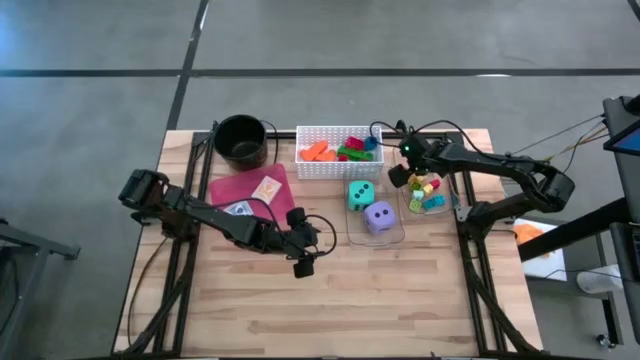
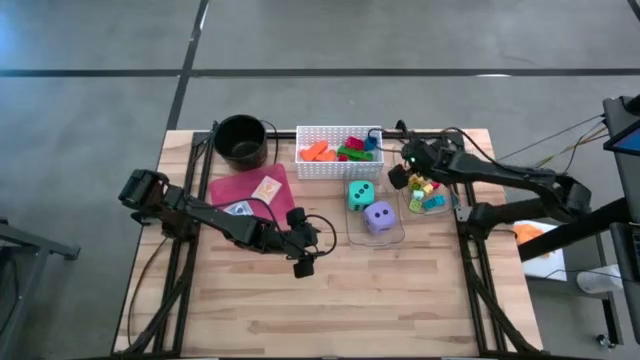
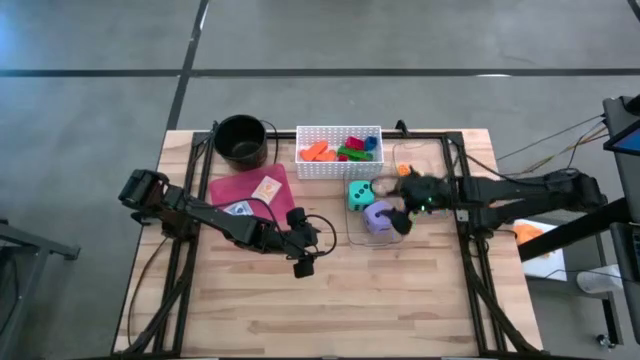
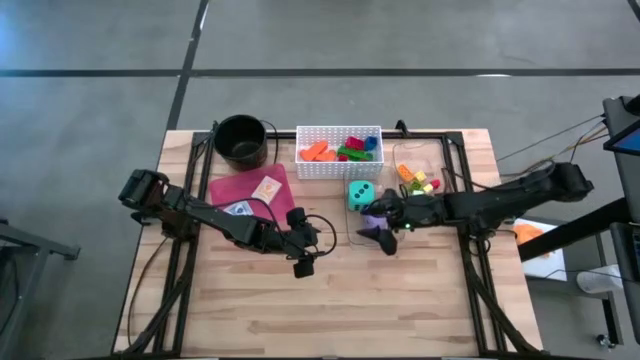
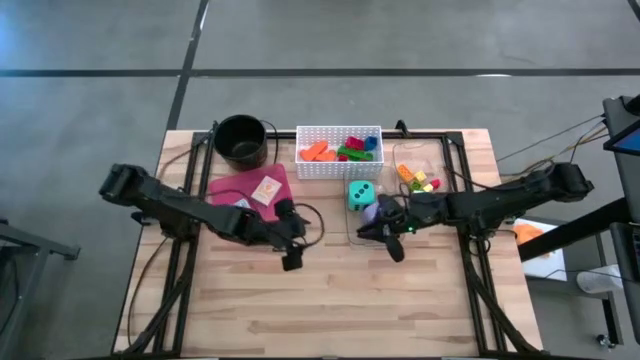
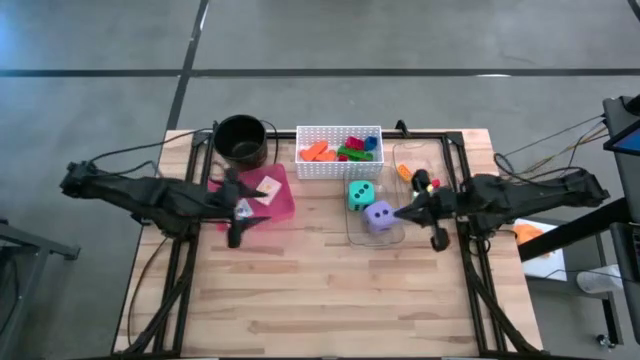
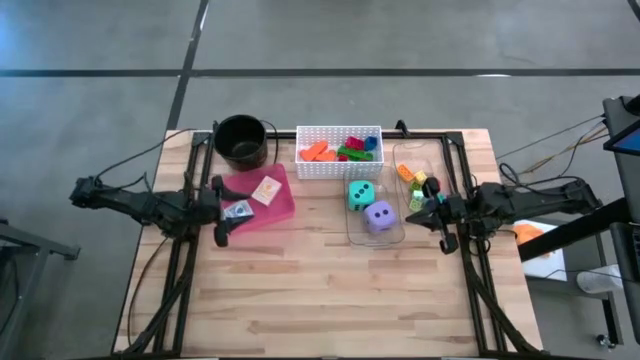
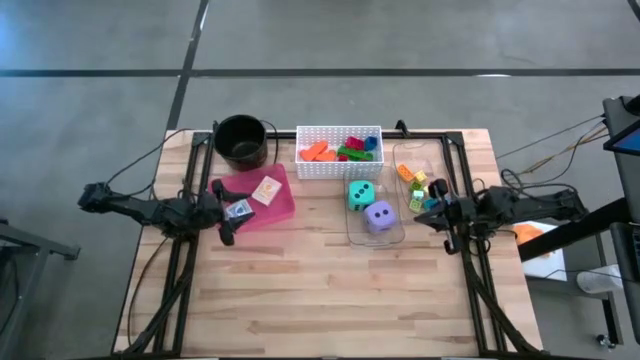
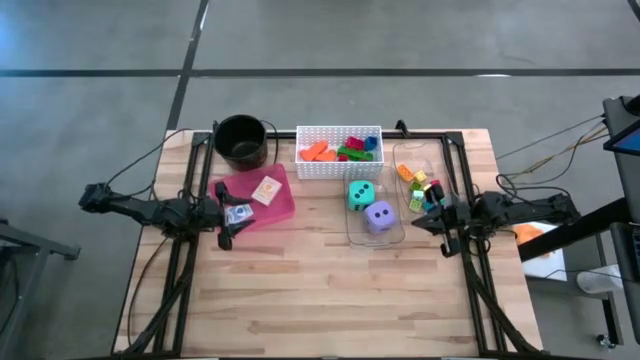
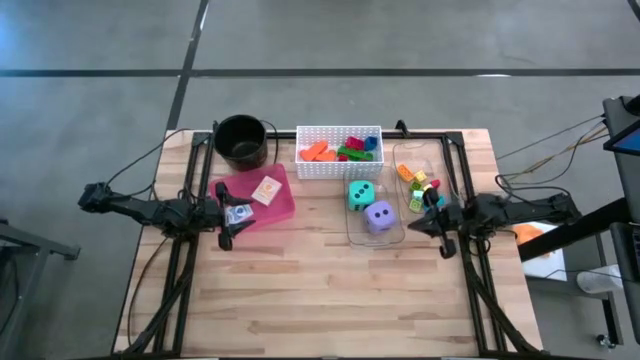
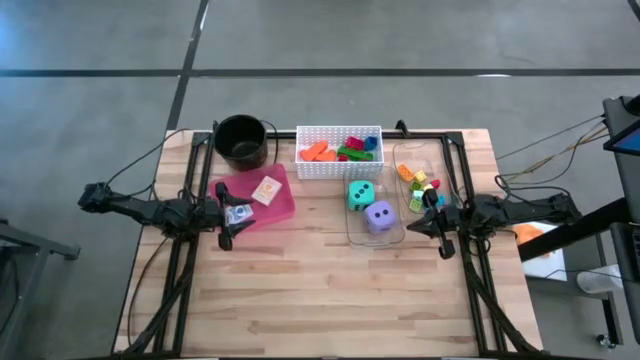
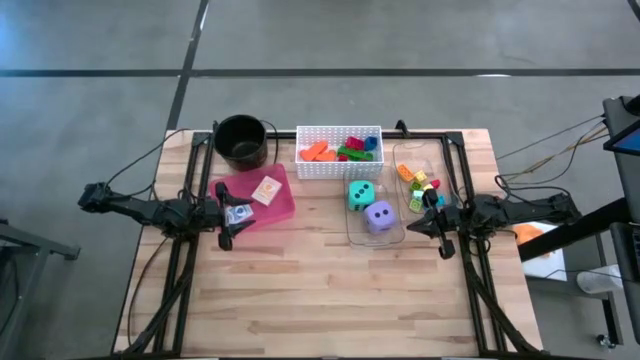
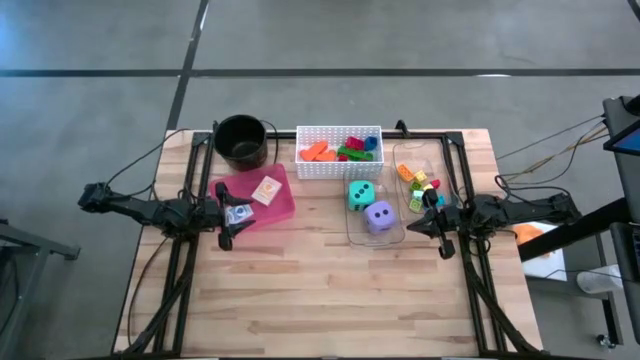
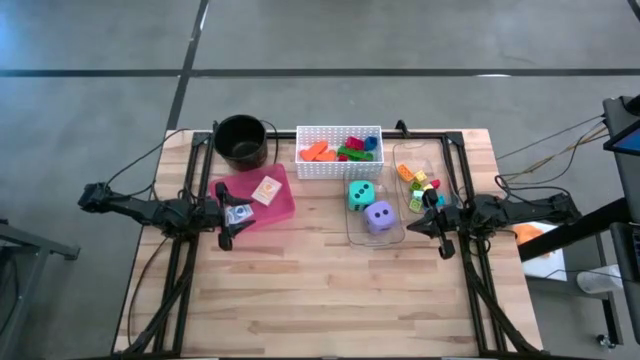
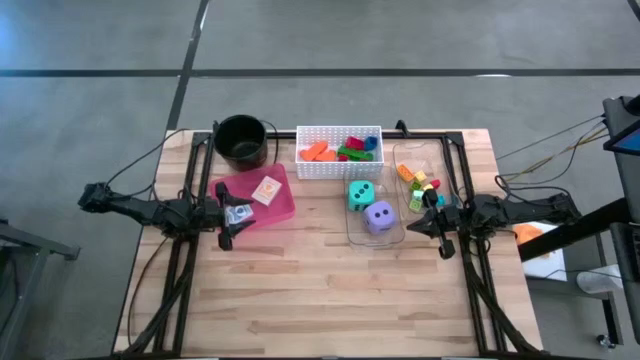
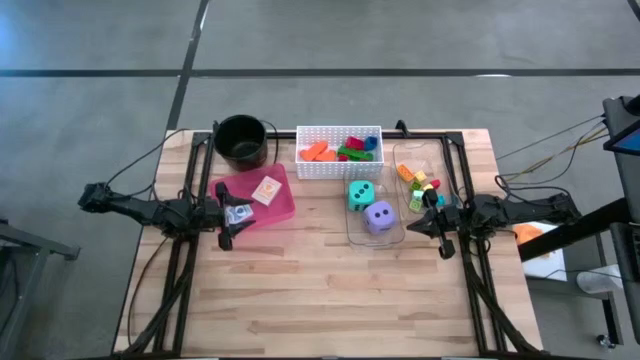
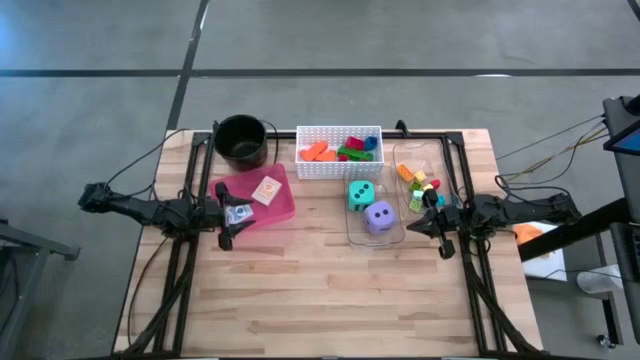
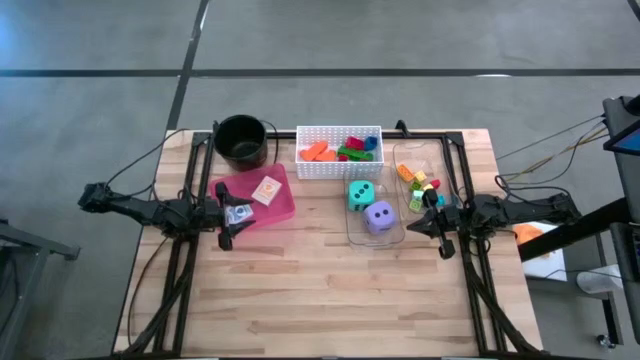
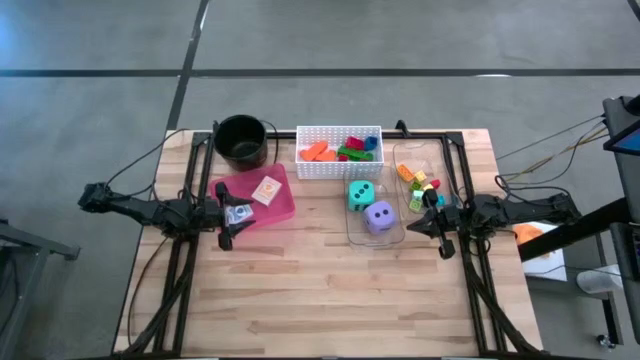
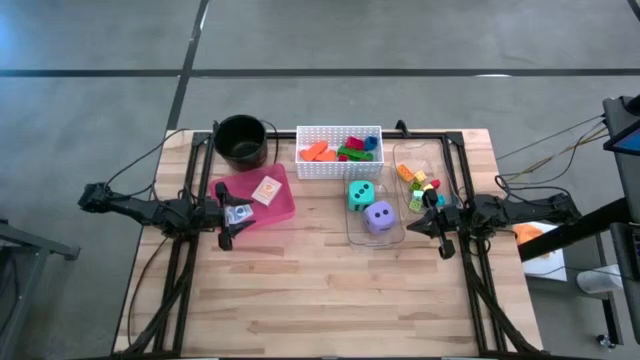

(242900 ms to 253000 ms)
Task: Pick & Place Toys
Return to Home Position
